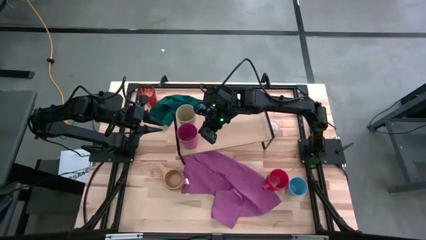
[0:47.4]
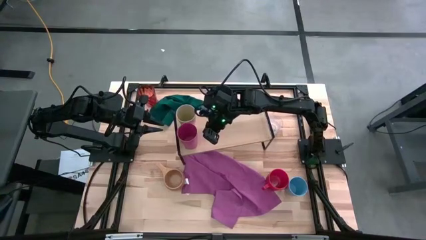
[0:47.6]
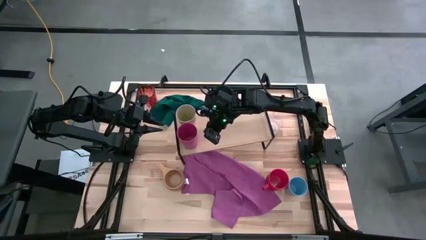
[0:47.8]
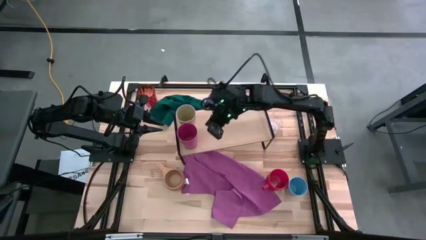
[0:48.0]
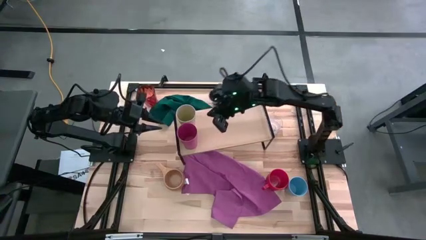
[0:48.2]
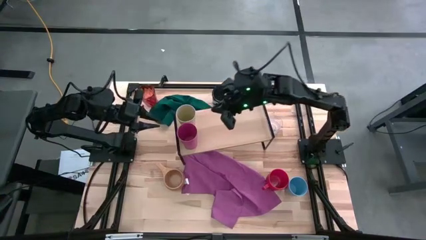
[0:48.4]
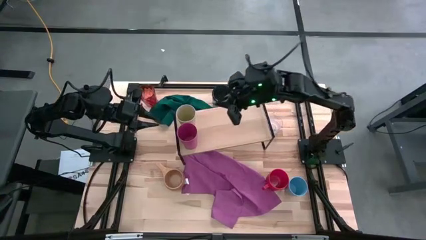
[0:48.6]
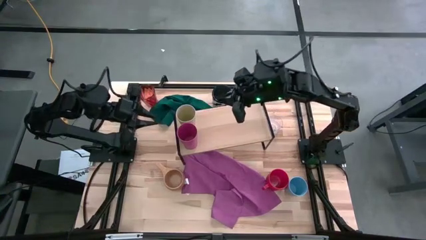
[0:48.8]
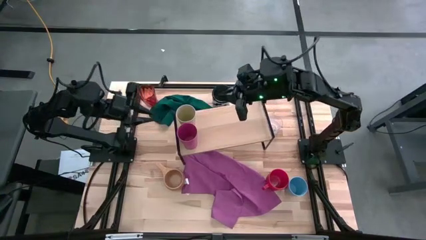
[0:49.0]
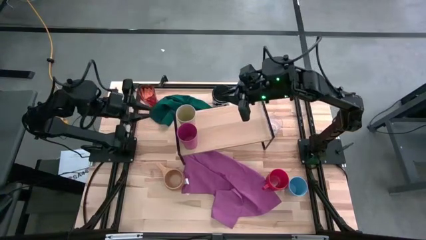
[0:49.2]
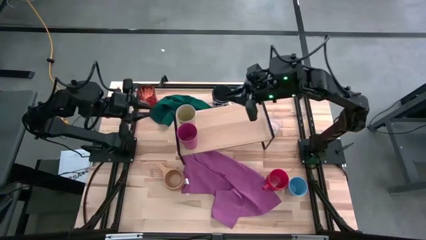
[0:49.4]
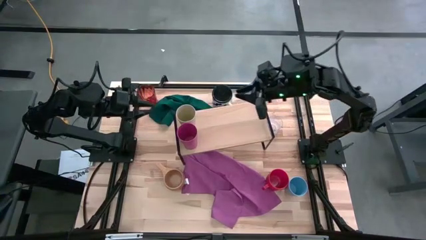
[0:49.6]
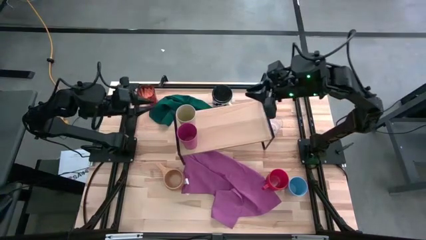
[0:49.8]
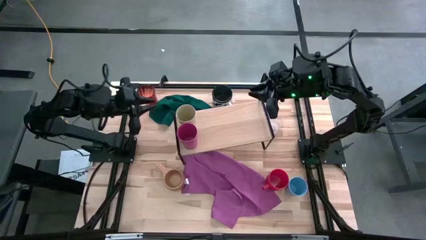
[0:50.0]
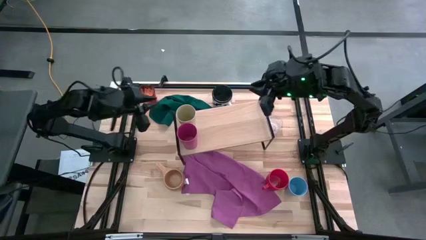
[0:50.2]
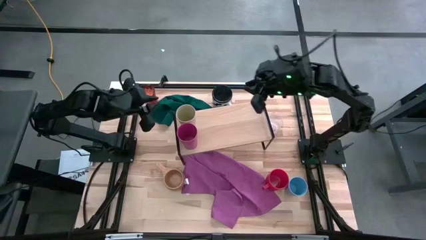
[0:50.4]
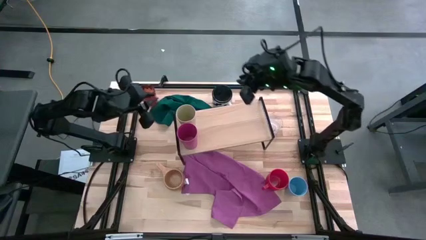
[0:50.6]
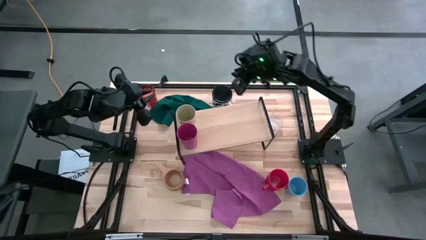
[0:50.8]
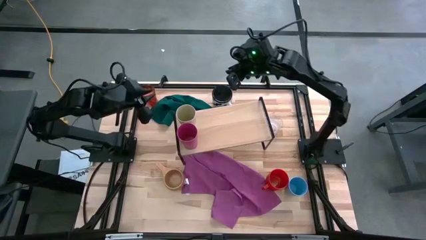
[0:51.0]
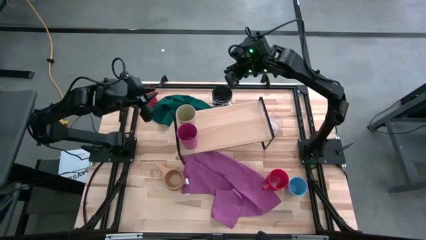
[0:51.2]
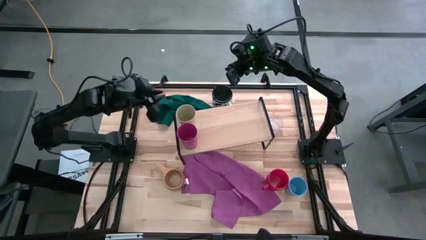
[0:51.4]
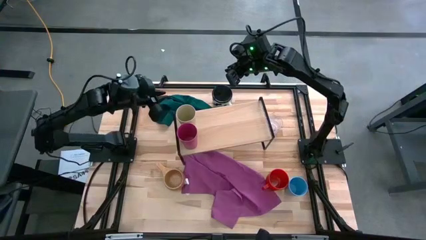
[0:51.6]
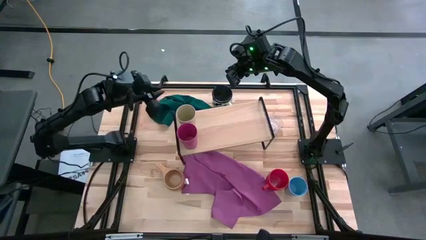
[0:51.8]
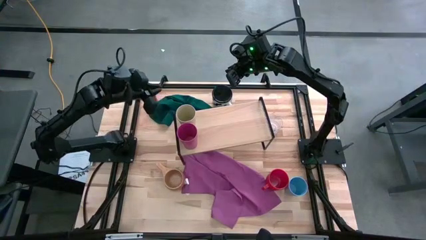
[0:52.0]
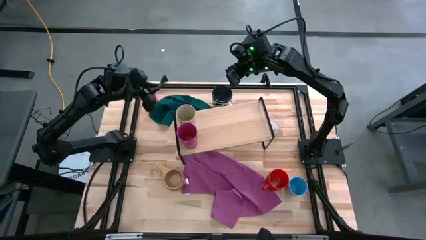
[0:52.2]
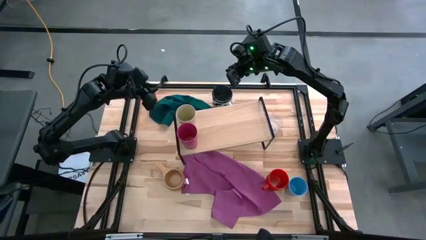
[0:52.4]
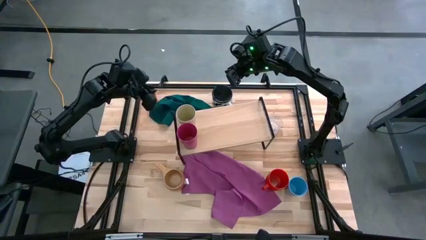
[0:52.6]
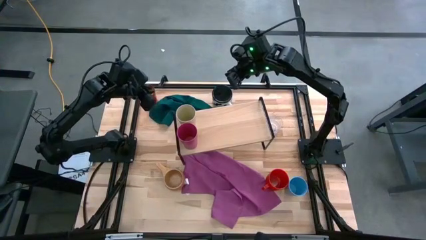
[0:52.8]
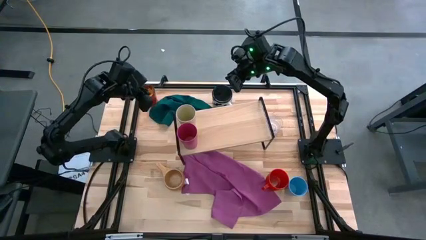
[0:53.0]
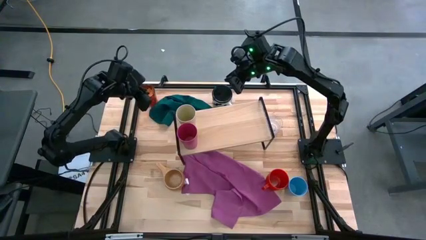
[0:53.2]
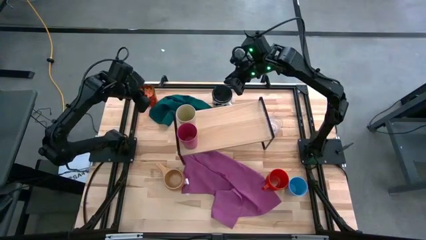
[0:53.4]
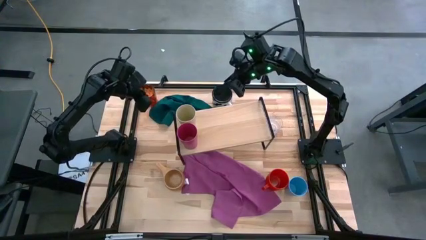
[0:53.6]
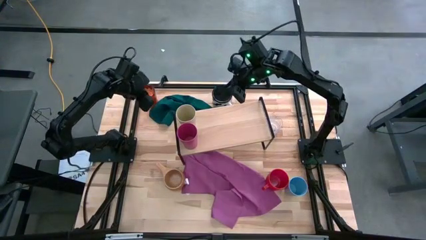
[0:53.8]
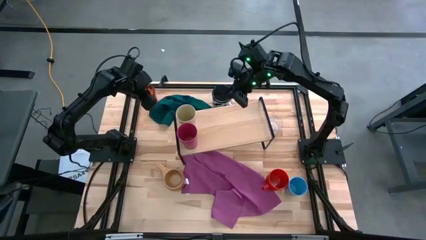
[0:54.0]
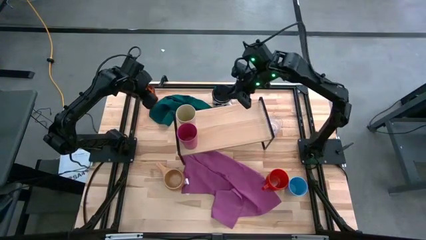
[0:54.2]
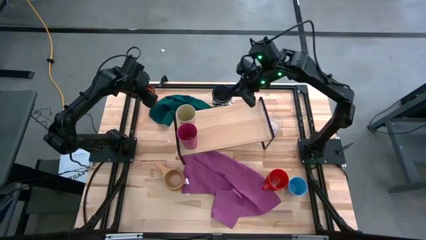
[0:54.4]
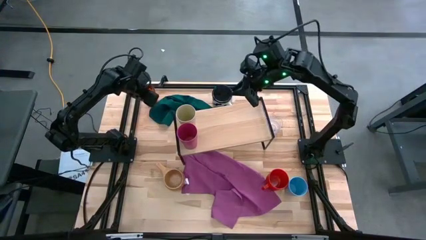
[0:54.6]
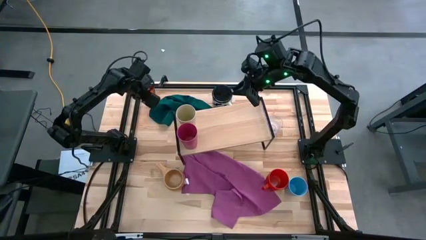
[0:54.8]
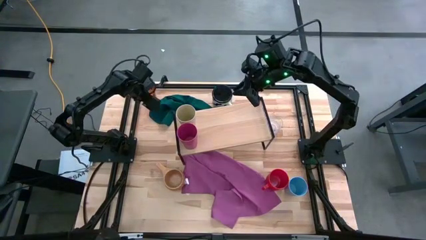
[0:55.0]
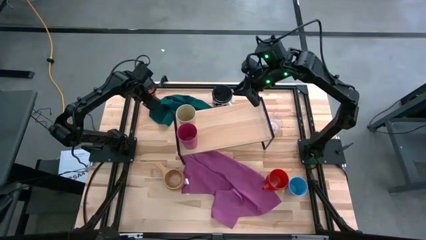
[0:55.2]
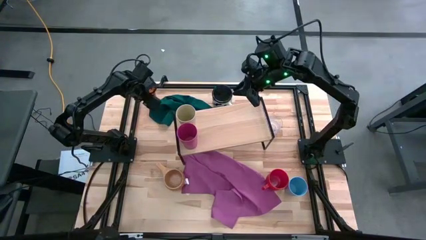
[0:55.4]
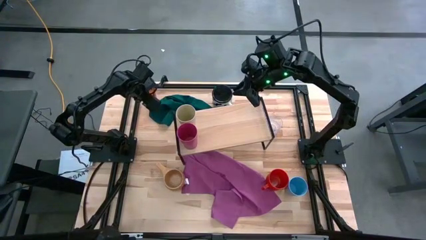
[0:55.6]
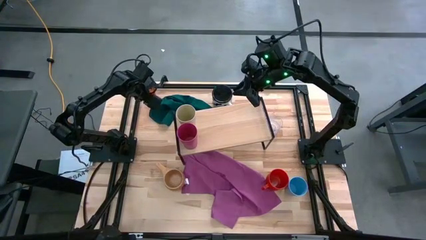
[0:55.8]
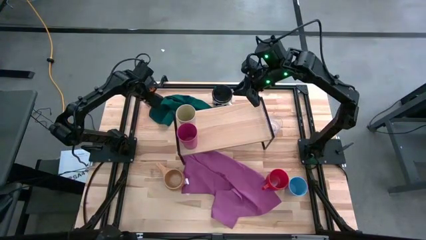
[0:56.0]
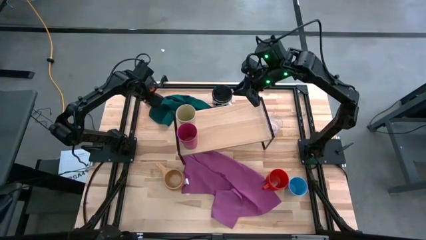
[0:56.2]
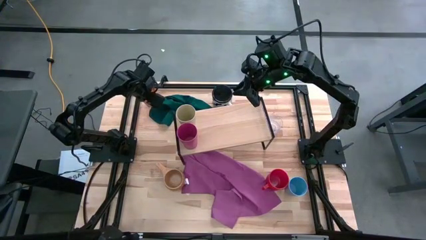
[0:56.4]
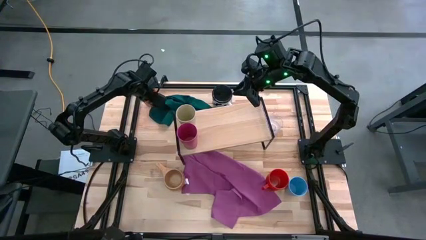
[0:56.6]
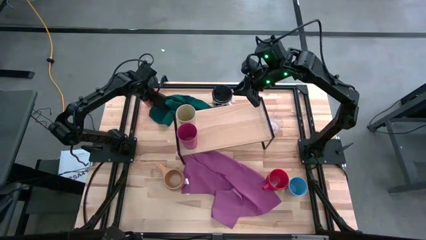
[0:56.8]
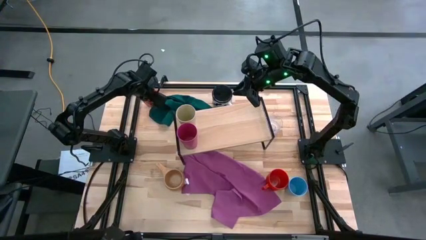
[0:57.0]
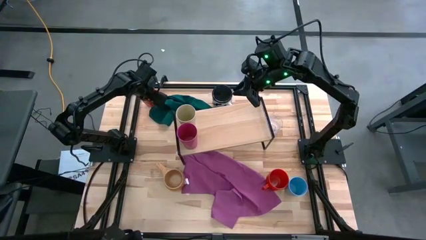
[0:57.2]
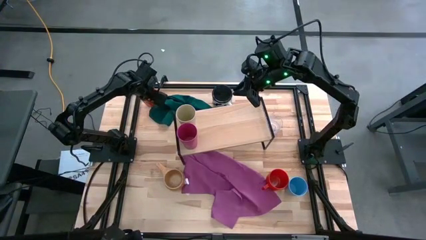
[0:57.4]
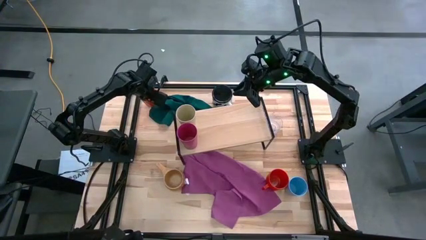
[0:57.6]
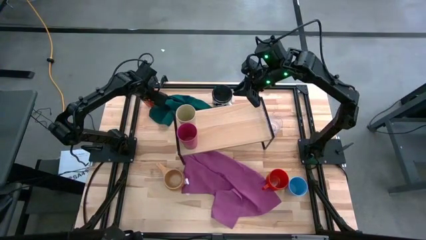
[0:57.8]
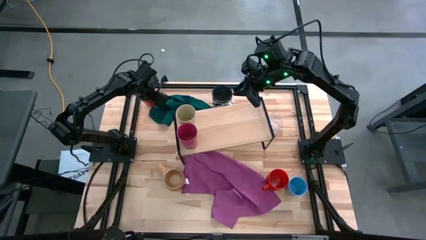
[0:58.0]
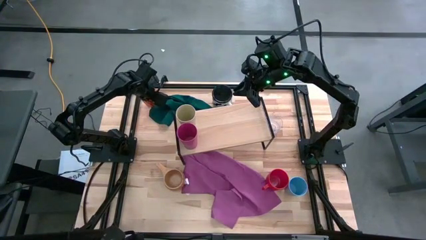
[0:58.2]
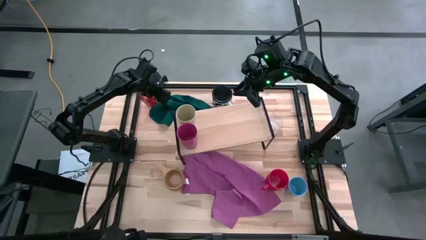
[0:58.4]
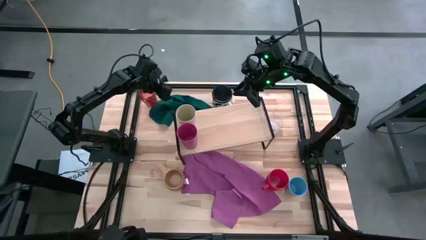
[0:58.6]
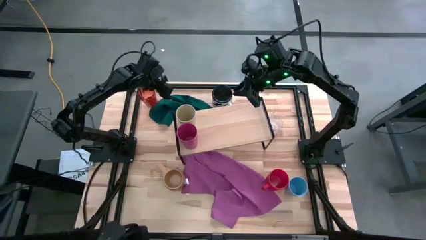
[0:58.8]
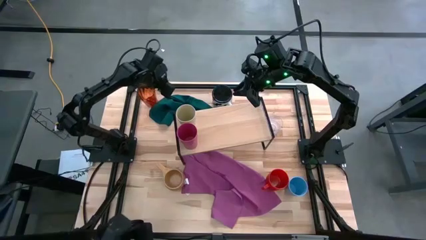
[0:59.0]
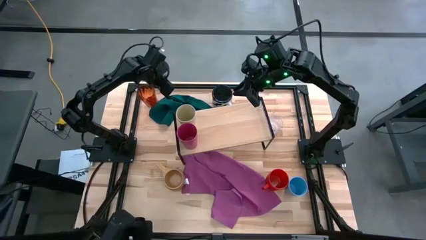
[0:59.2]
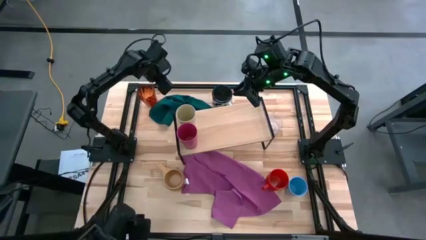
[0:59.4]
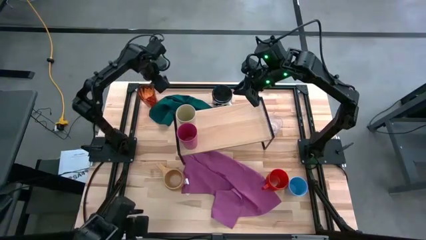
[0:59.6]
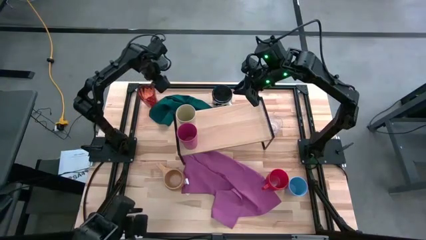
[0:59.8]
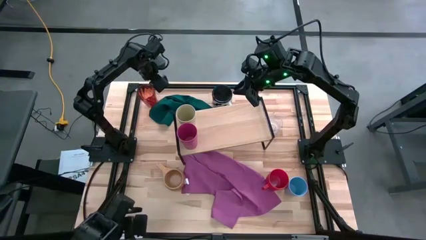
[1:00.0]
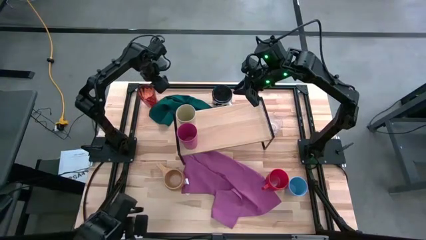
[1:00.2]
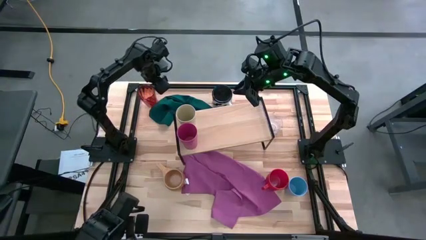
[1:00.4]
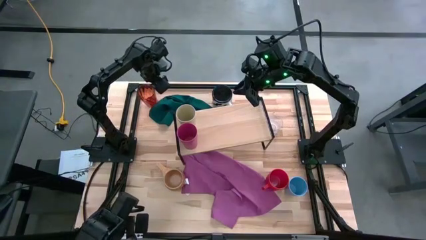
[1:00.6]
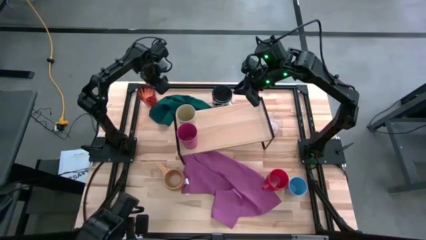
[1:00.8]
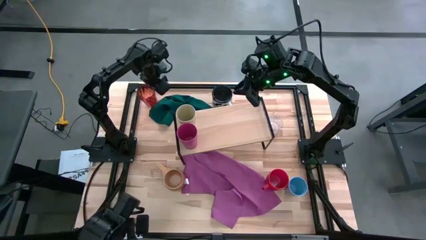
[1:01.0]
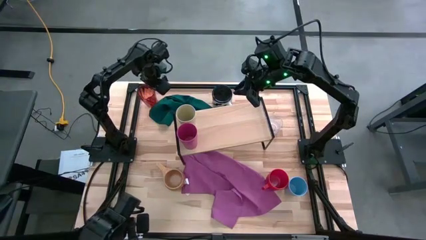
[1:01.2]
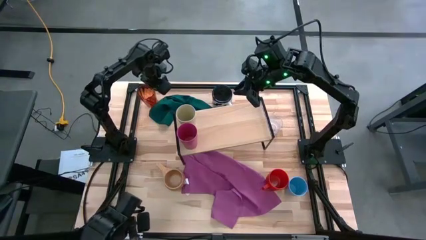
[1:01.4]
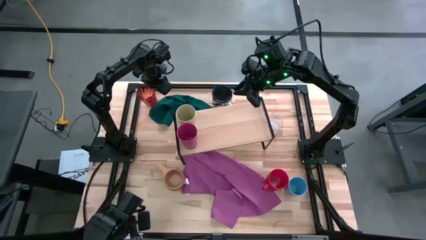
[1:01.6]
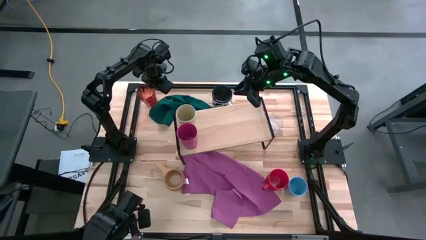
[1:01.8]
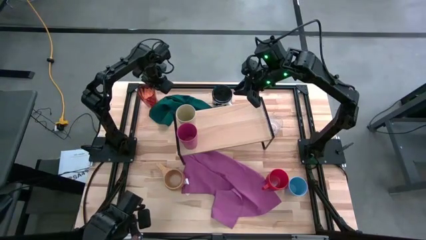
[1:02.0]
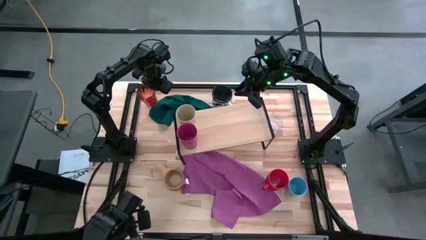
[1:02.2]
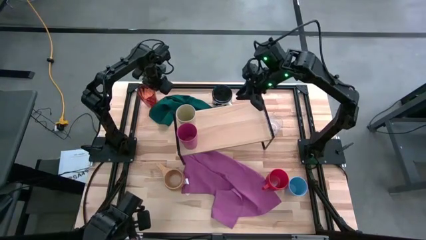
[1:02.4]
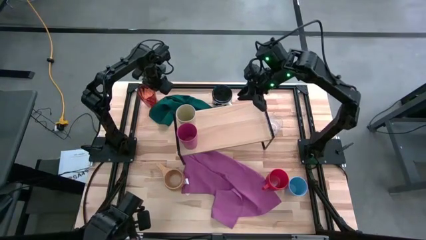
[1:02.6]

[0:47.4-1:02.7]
Task: Stack small to large cups/mugs on shelf
Put the red cup on the shelf
